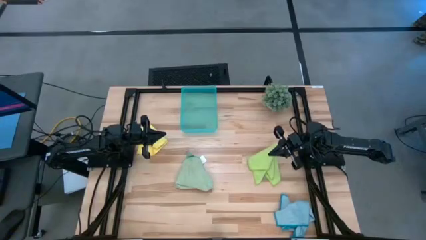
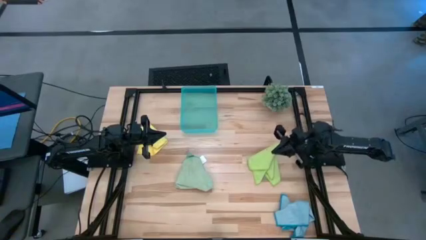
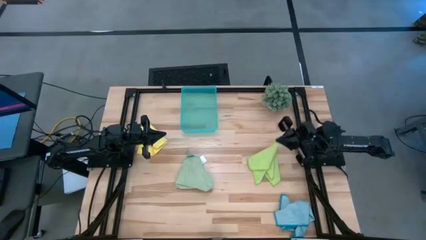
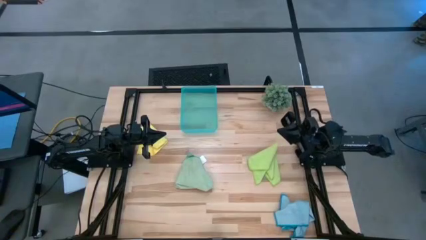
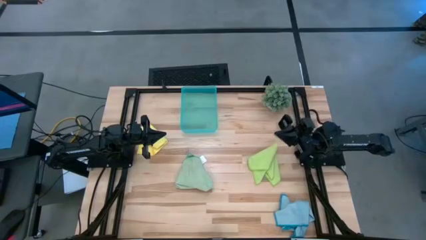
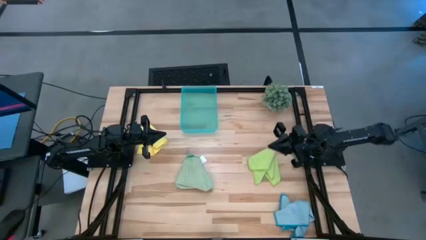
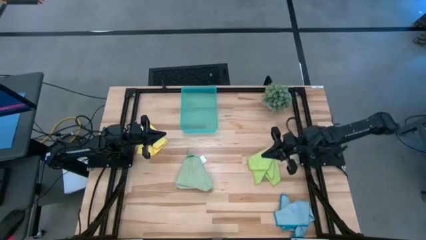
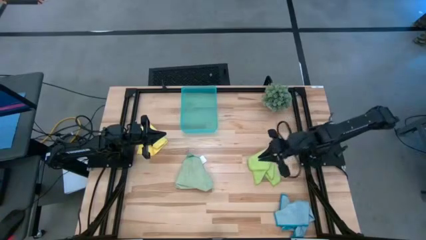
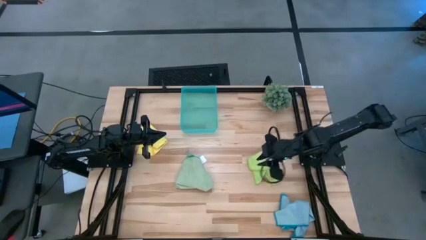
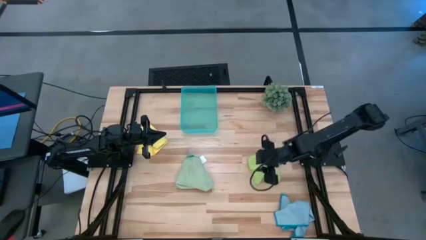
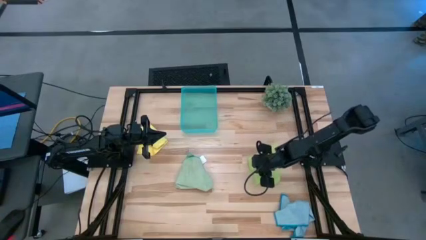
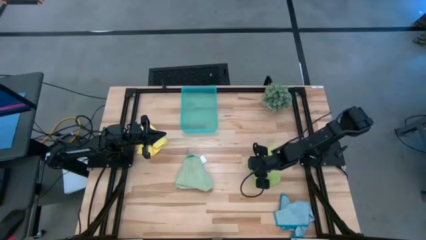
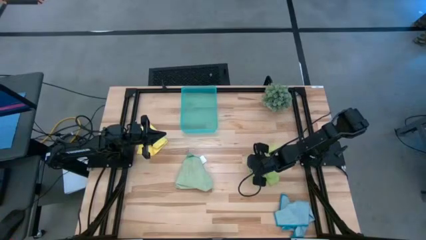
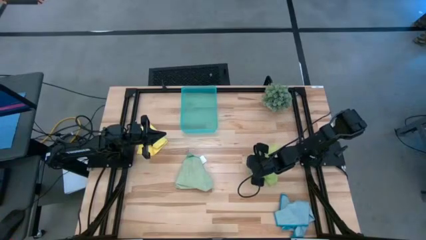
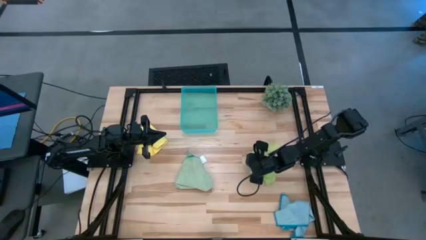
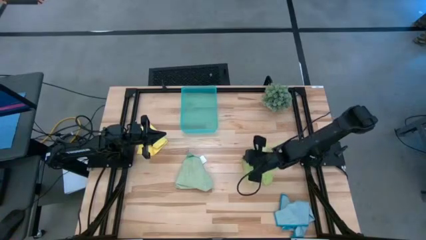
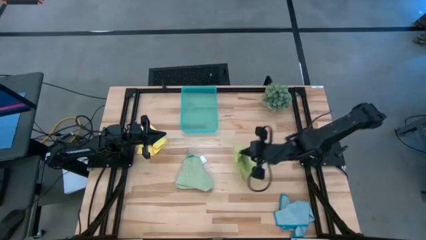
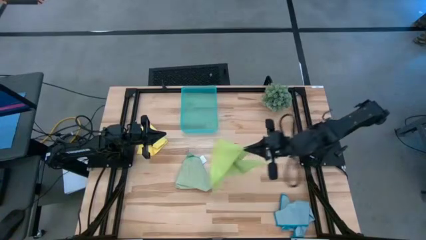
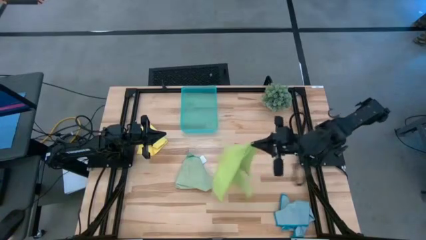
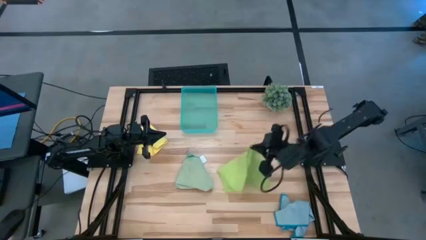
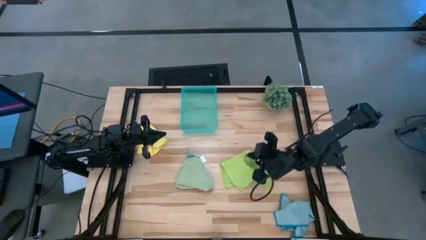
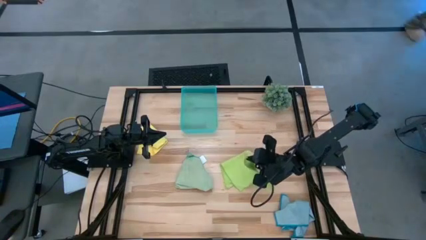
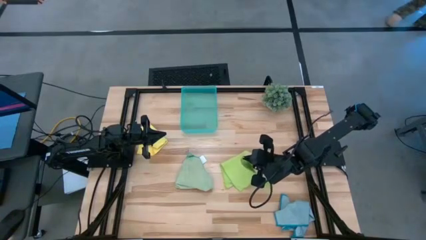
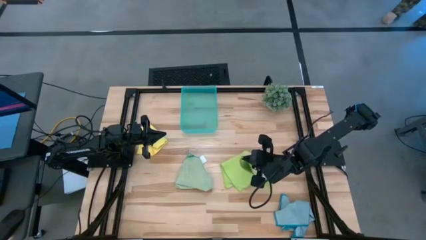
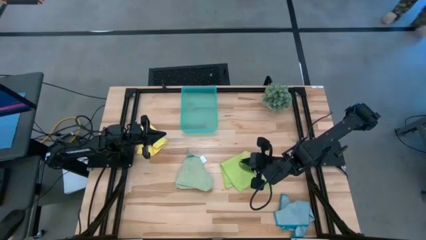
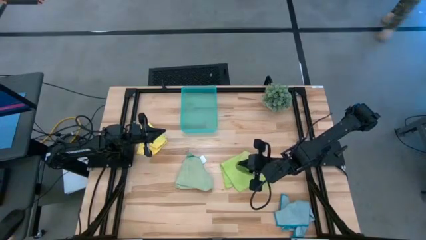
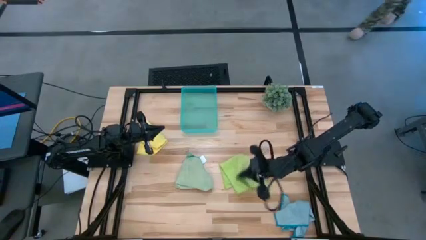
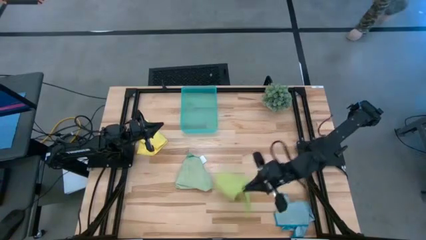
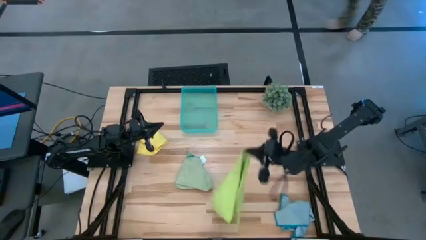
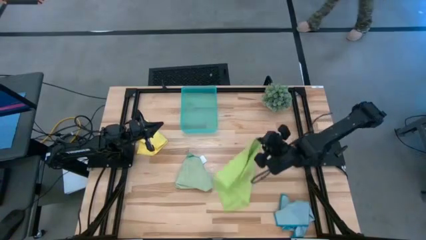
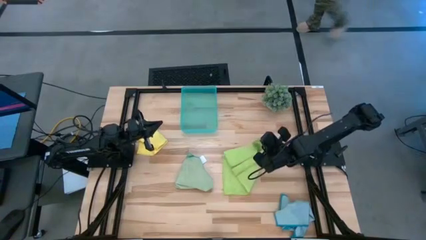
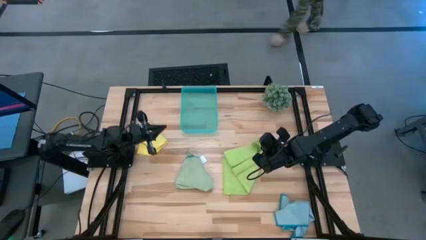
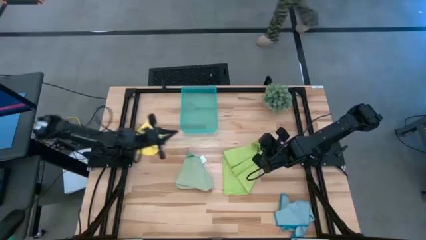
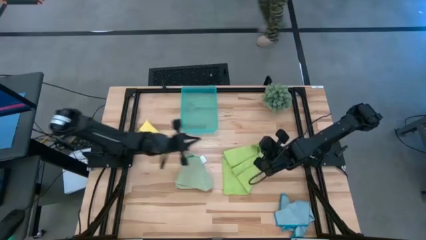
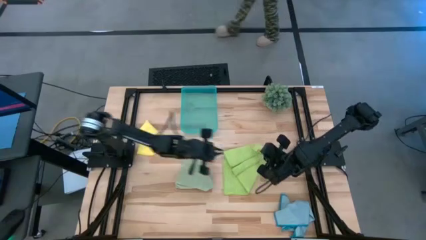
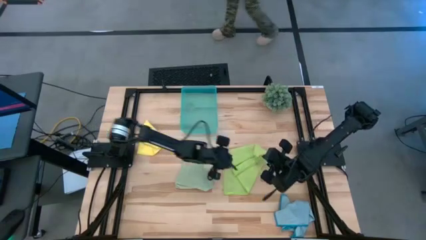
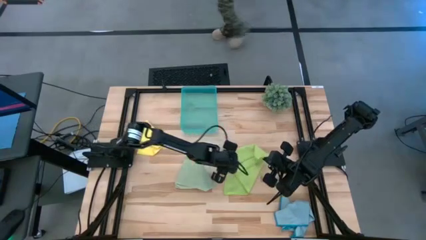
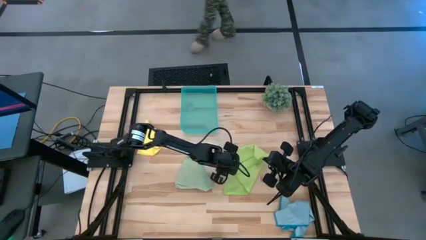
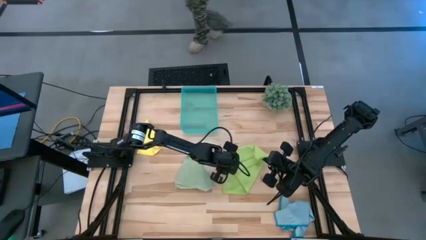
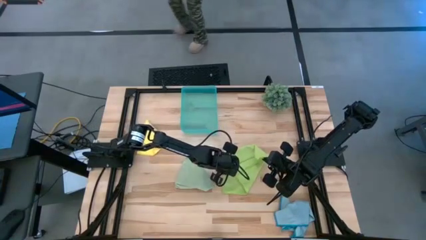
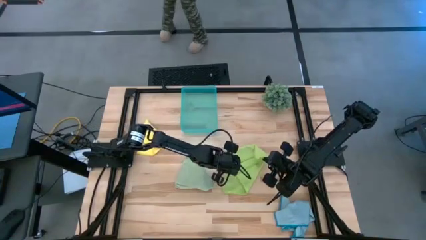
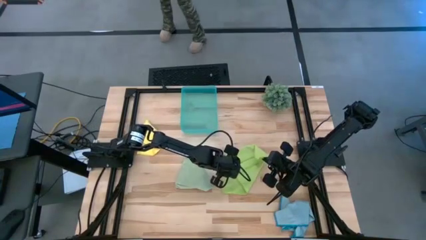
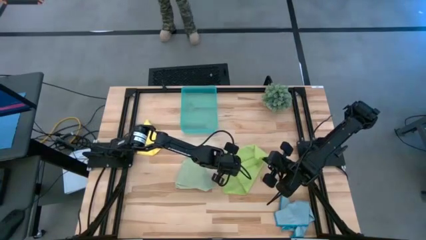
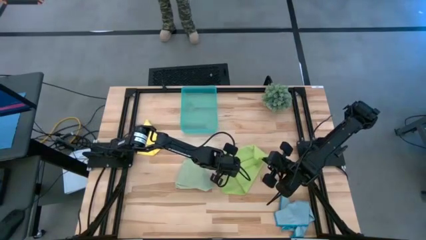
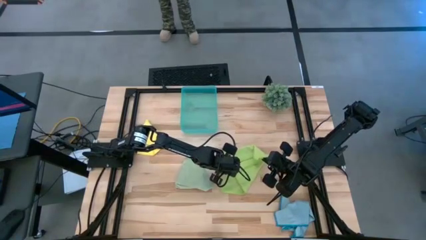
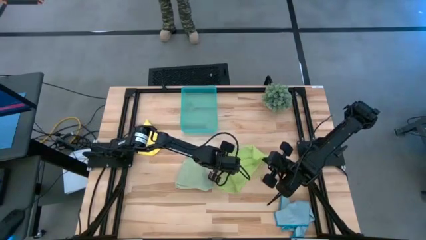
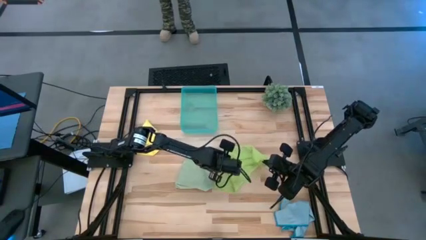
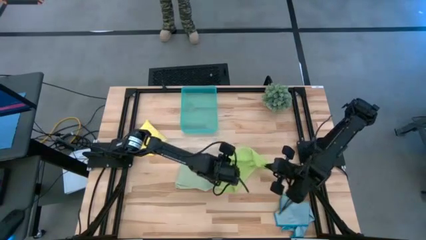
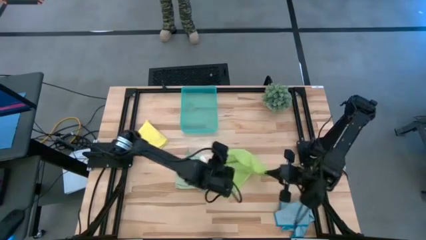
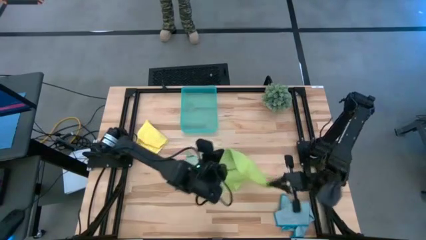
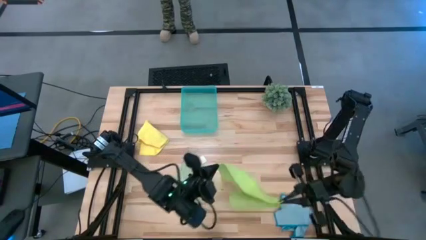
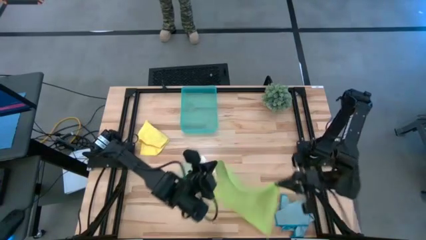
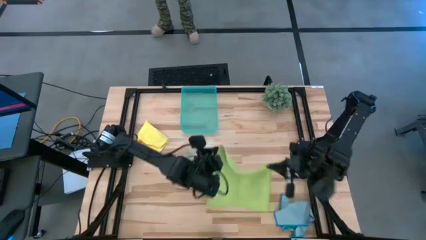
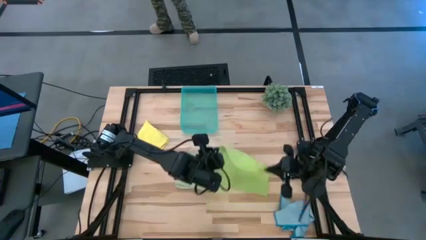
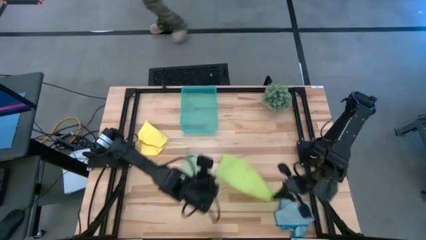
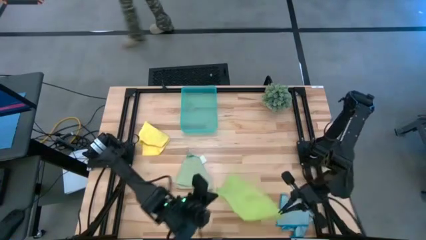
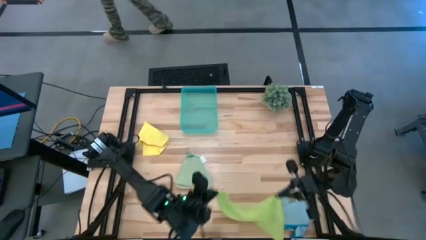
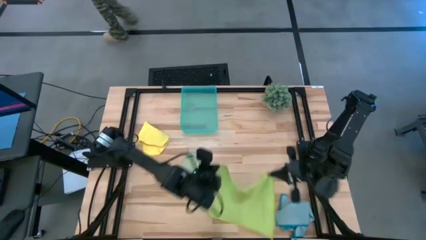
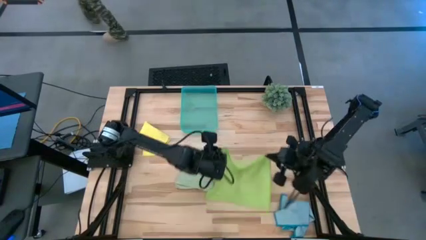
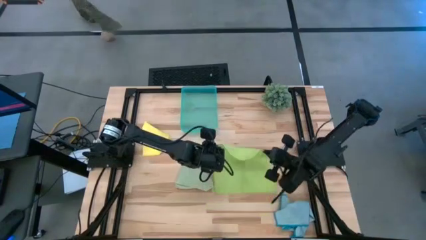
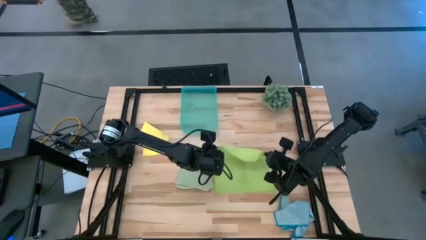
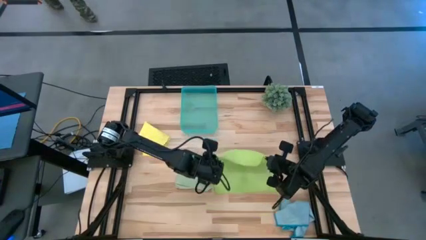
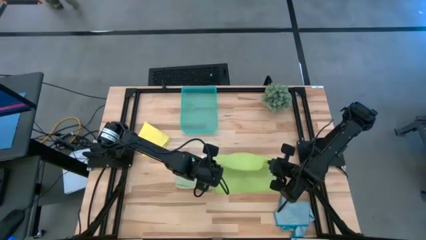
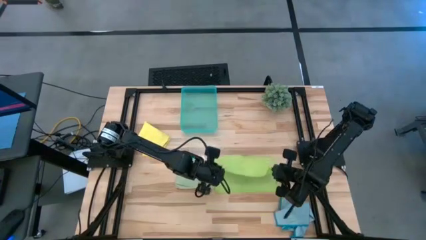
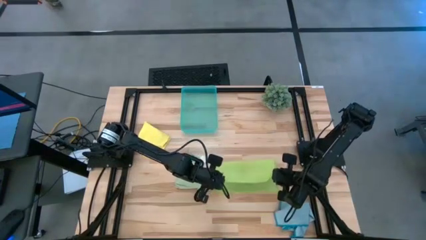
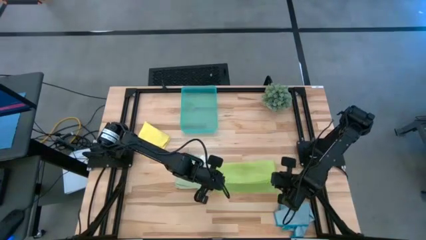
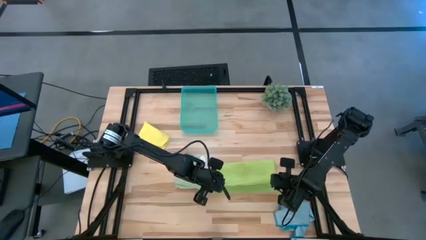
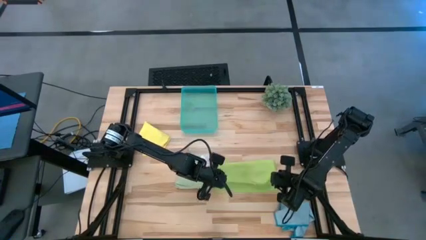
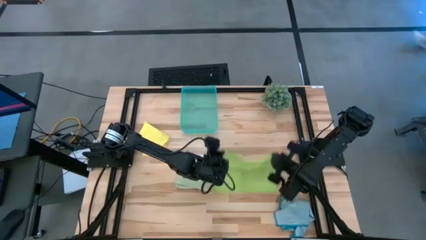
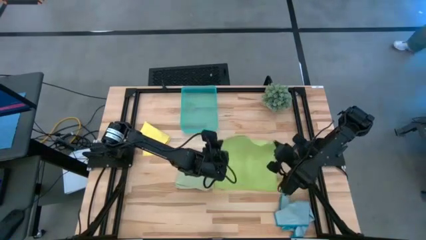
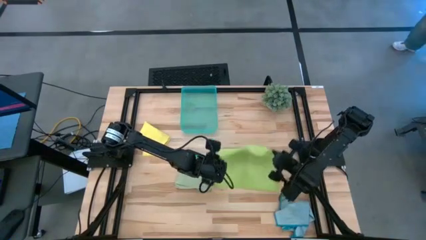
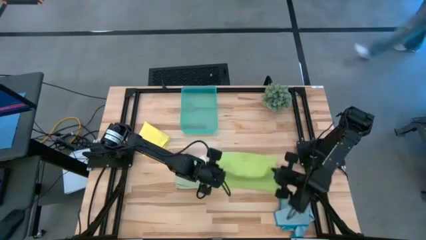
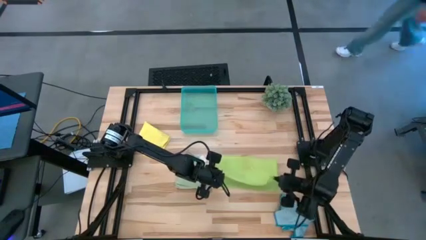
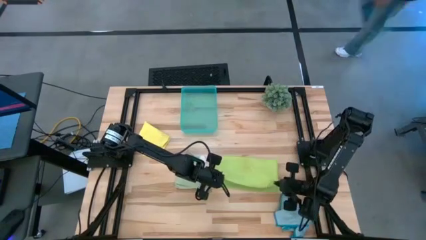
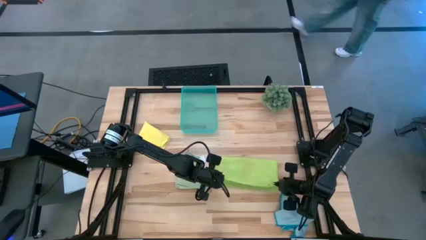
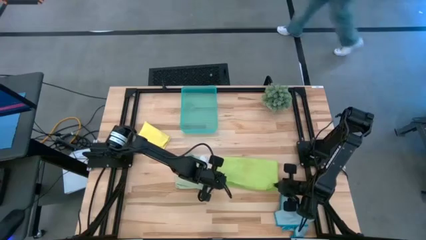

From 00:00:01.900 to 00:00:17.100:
Task: Fold microfiber towels
Fold the light green microfiber cloth
